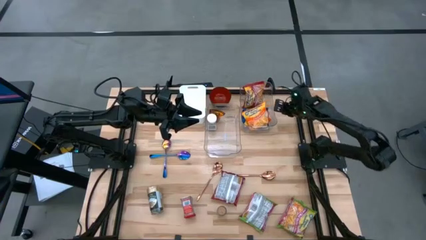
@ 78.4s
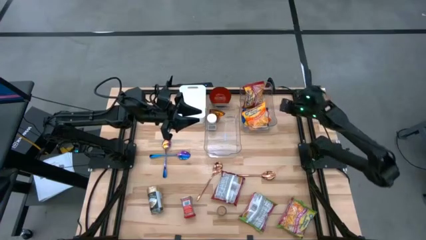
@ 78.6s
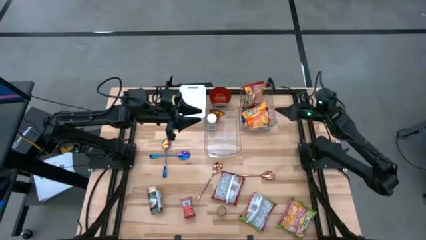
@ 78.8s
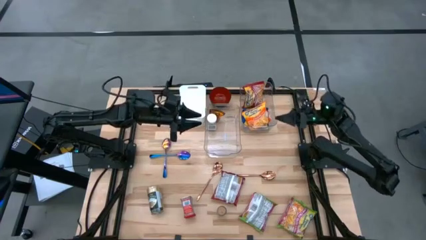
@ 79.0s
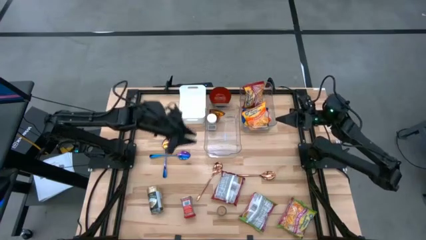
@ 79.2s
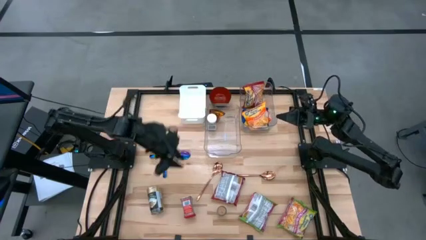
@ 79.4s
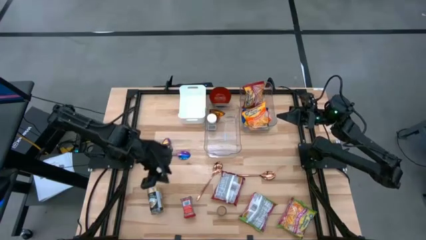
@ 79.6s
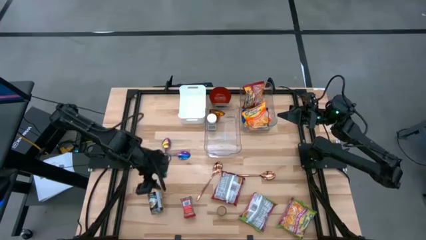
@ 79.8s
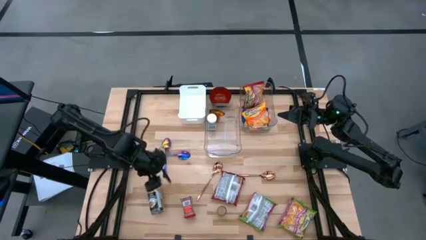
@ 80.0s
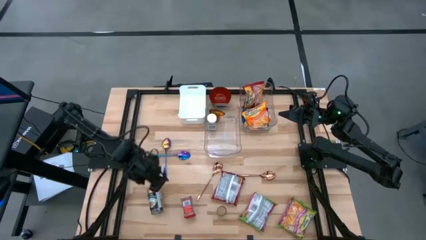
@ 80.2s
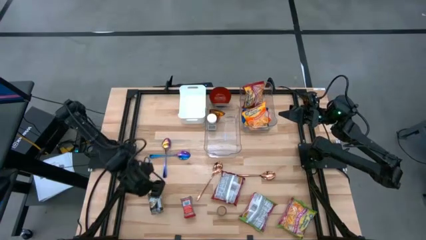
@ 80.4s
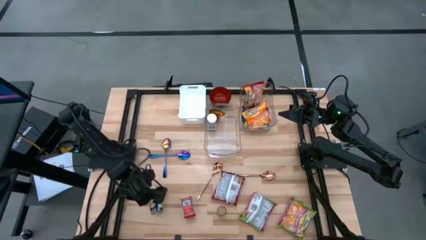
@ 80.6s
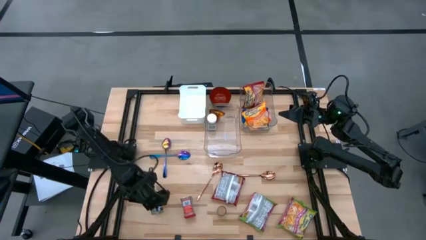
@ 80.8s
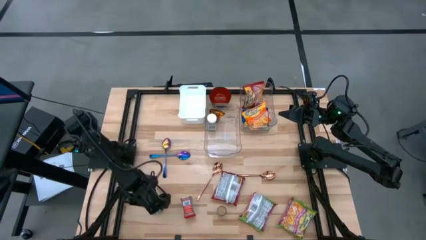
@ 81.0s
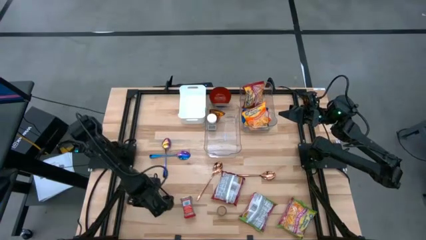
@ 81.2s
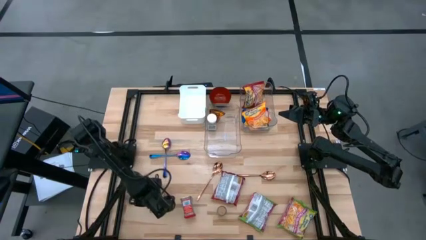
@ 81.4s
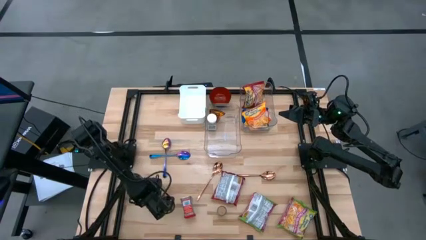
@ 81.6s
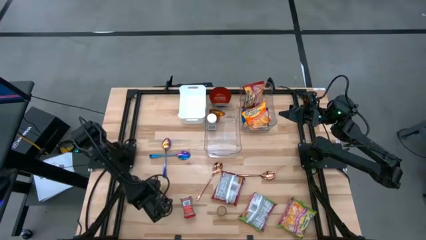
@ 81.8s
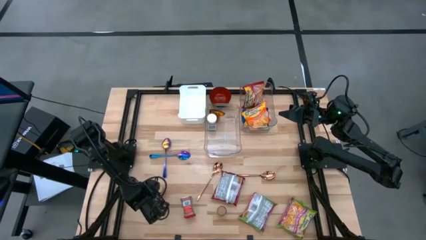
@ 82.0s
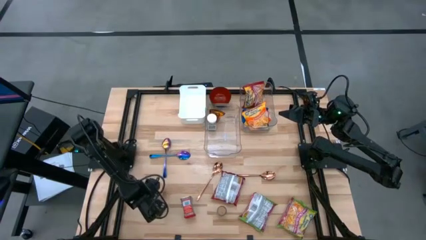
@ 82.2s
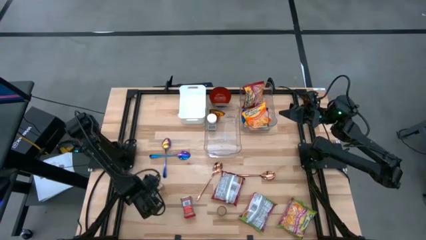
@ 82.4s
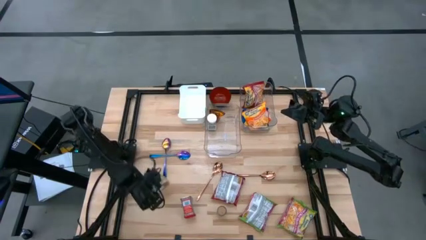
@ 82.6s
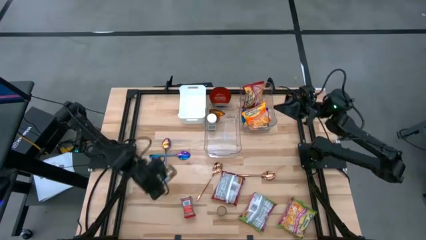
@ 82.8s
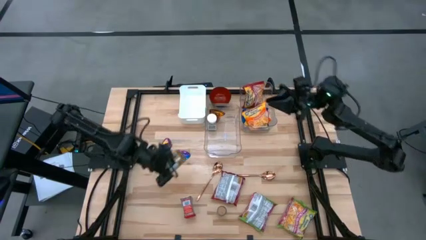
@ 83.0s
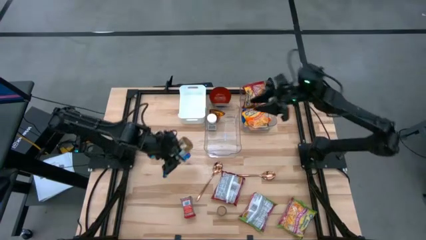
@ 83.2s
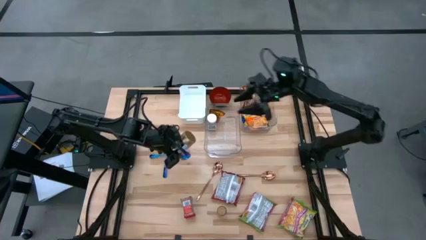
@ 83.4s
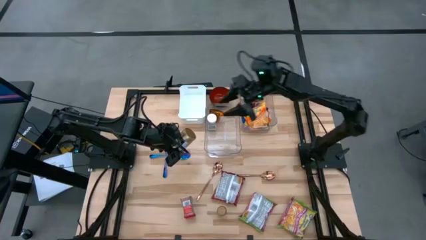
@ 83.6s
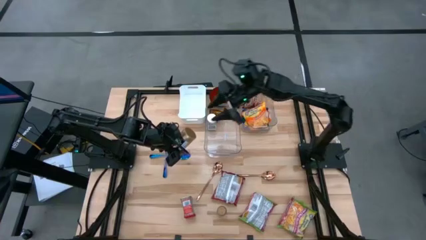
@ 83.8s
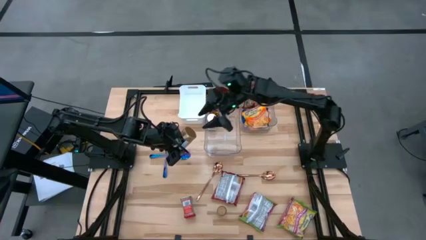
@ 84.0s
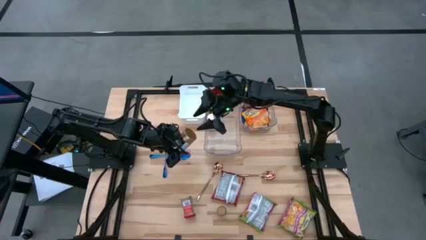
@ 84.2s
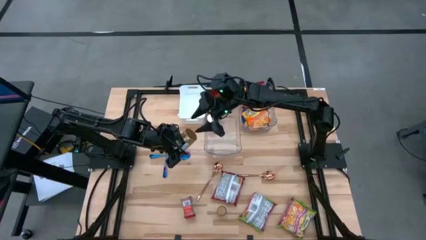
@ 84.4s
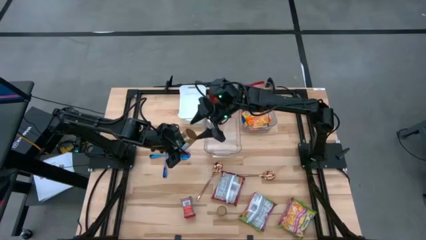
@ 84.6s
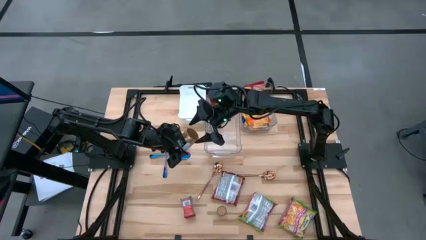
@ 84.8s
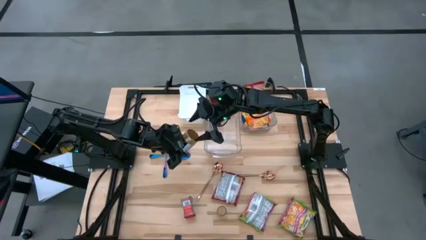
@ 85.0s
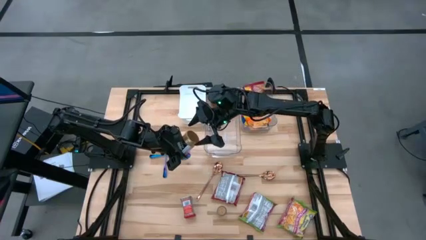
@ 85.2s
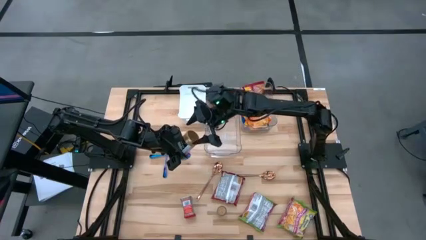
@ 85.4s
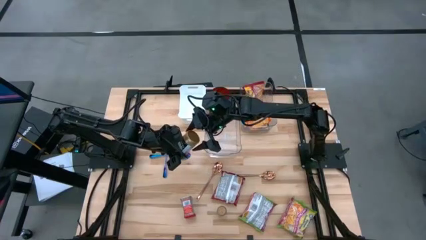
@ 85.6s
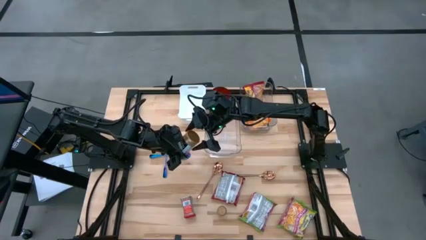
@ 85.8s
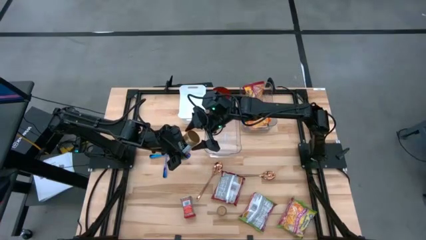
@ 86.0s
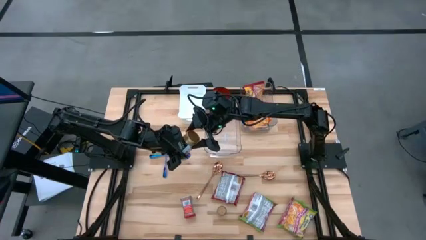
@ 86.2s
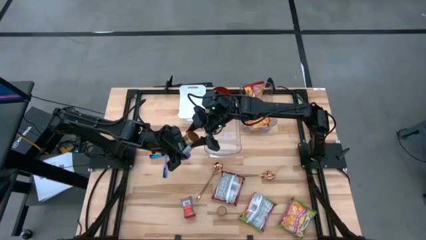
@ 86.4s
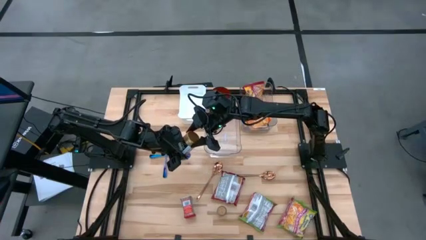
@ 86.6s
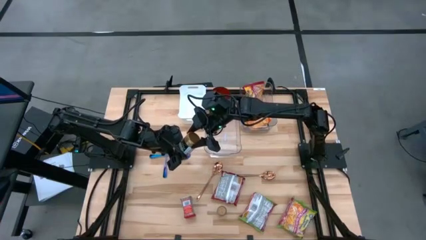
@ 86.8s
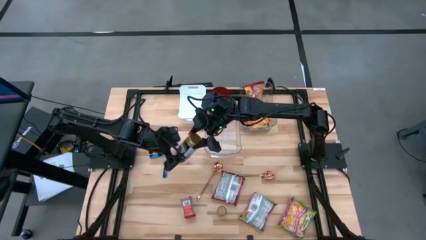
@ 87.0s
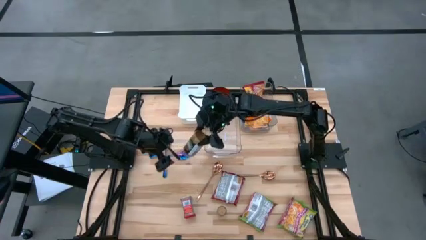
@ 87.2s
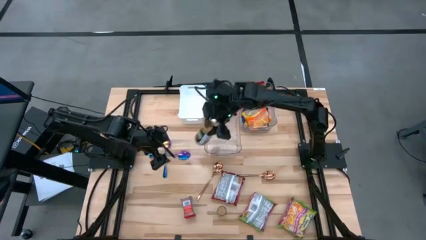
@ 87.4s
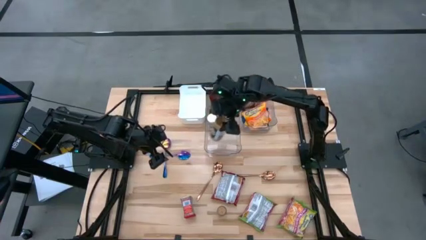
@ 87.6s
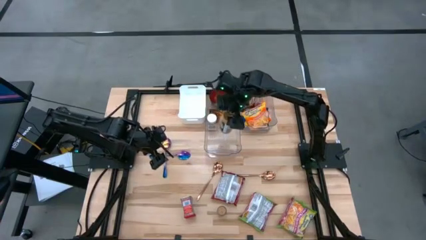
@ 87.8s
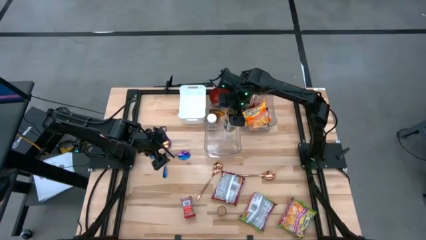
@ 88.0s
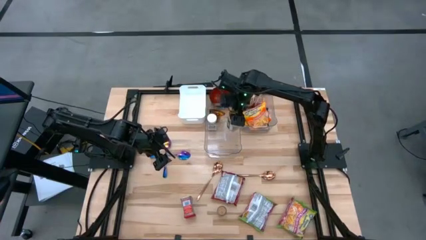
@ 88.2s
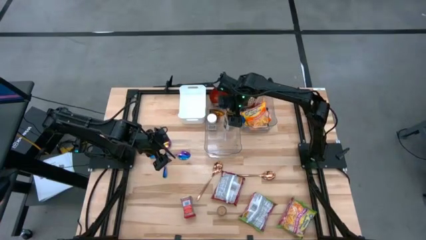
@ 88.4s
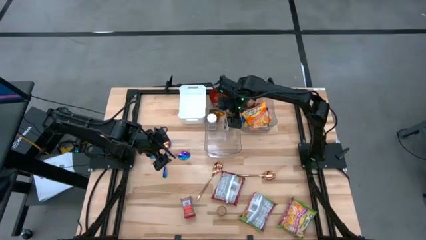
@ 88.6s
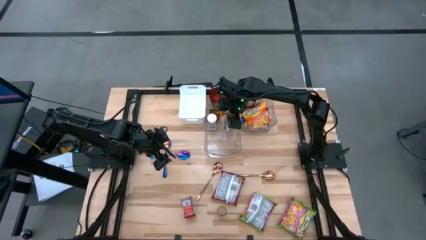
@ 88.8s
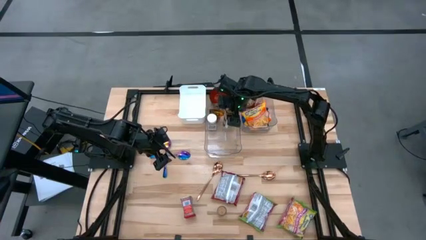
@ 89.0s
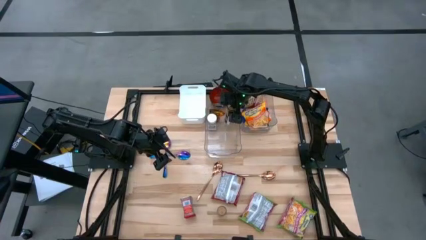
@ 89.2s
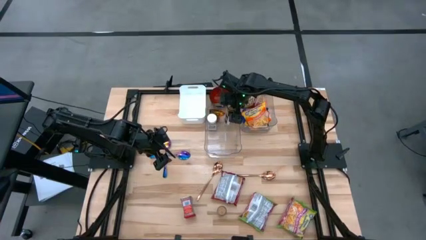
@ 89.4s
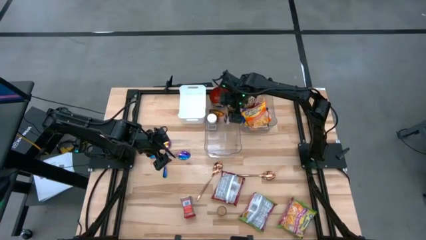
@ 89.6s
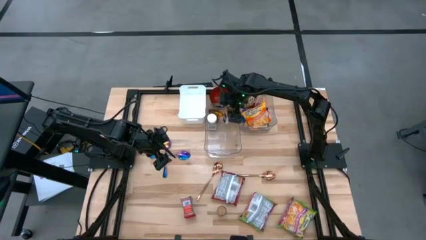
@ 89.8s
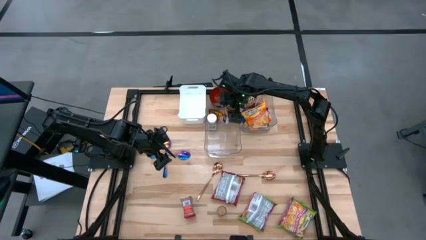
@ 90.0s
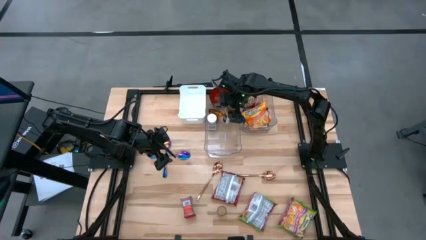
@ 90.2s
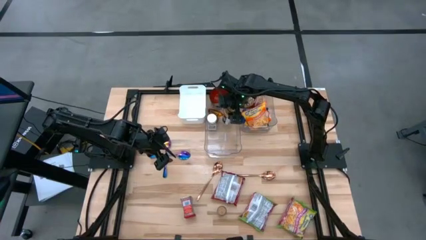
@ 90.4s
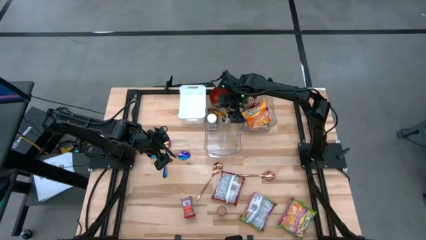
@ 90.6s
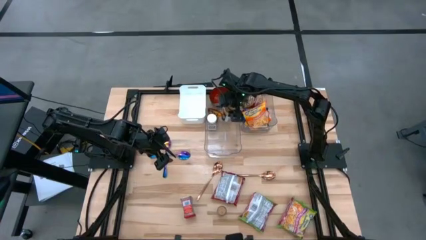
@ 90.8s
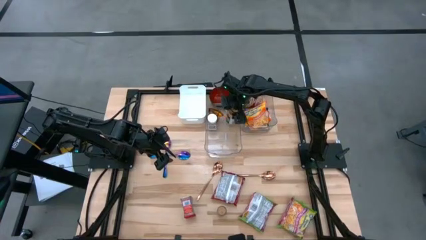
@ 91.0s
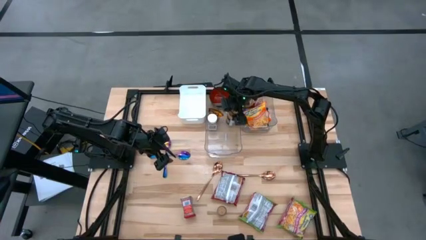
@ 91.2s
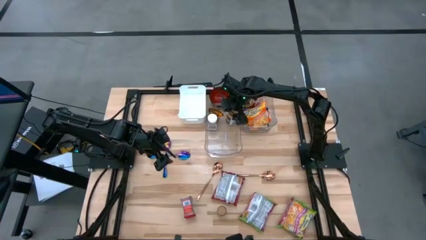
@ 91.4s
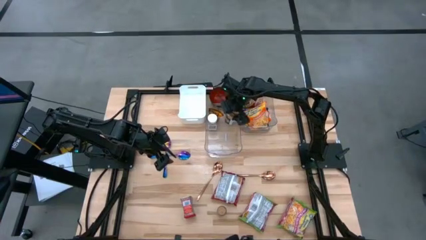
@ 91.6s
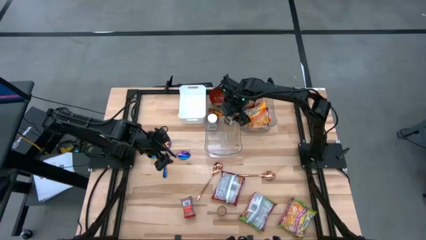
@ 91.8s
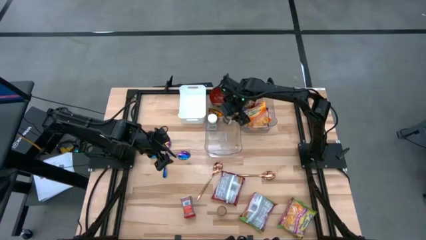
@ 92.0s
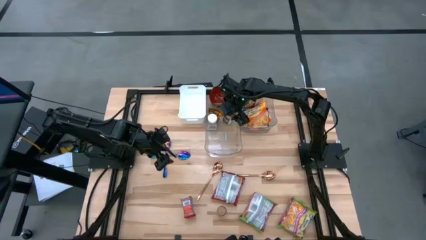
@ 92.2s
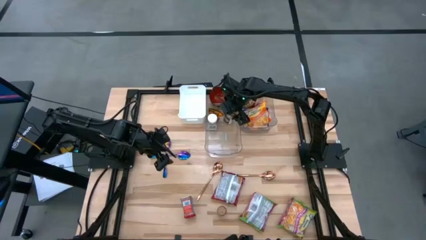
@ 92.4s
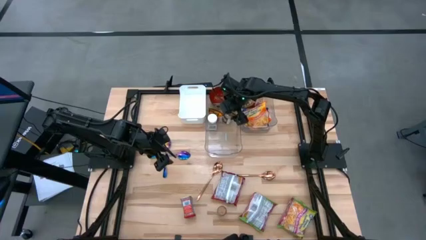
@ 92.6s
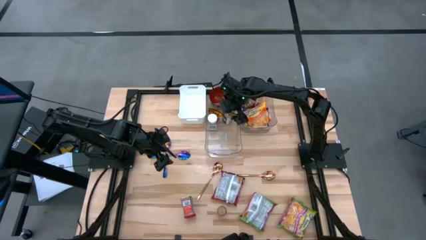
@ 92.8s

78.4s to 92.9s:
Task: Pick & Place Food Item
Put the golden spice bottle into the left transparent bin
